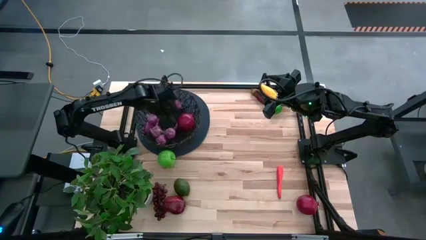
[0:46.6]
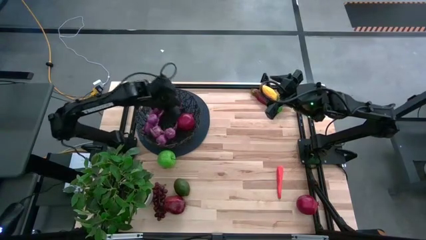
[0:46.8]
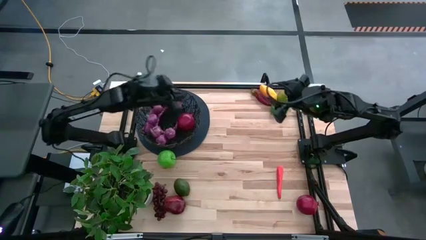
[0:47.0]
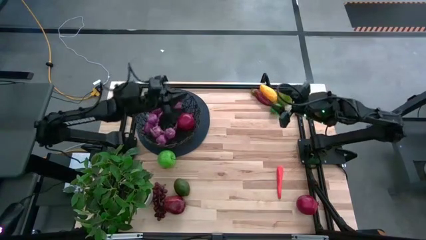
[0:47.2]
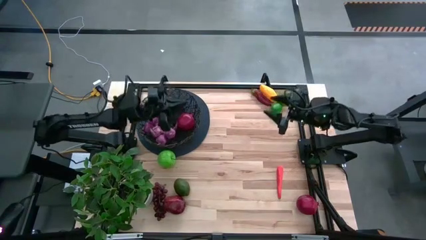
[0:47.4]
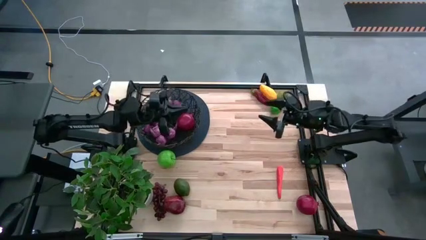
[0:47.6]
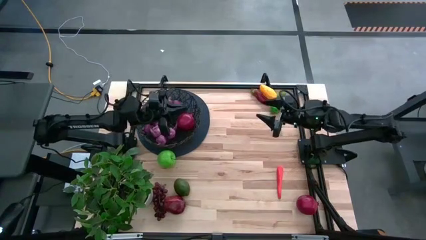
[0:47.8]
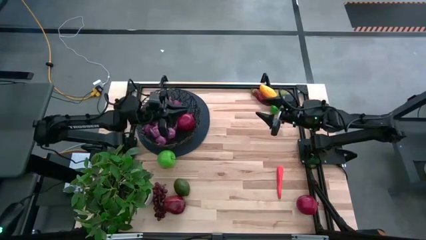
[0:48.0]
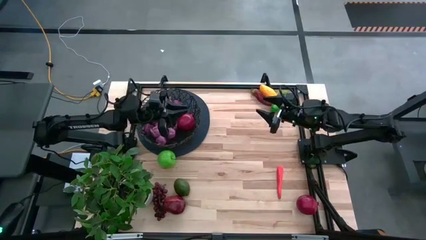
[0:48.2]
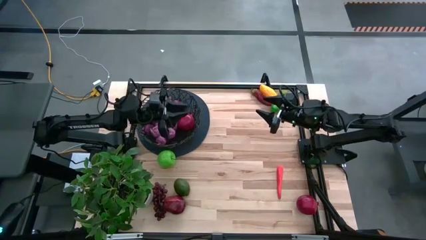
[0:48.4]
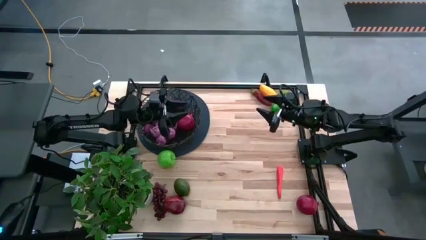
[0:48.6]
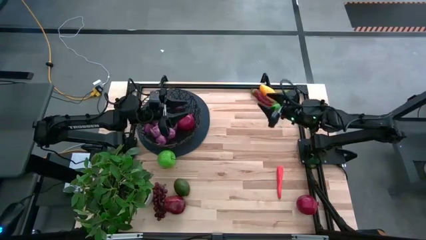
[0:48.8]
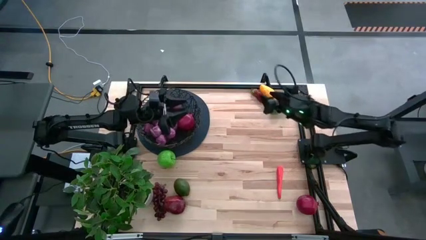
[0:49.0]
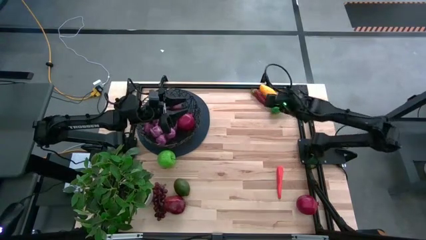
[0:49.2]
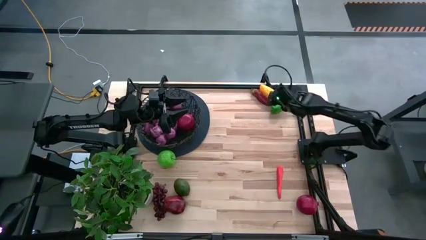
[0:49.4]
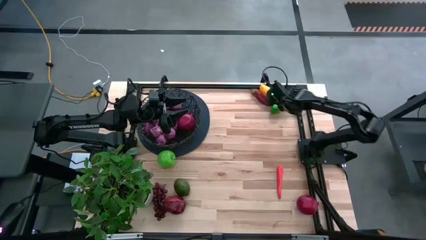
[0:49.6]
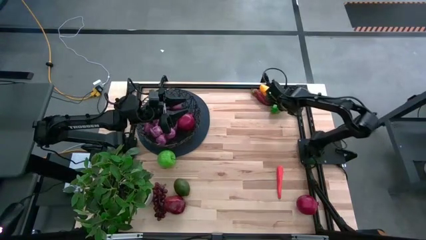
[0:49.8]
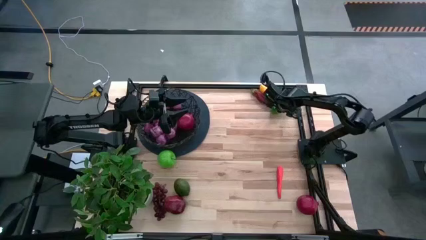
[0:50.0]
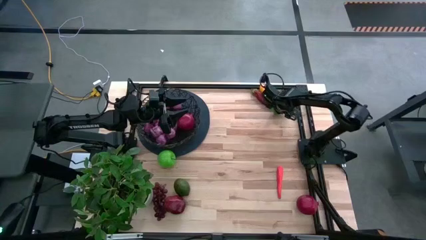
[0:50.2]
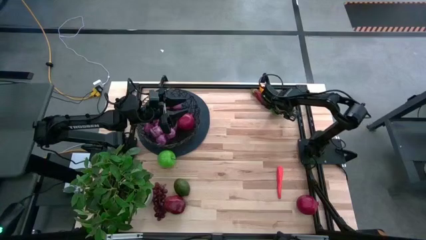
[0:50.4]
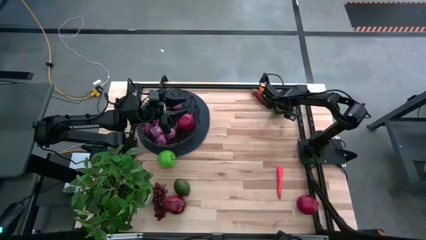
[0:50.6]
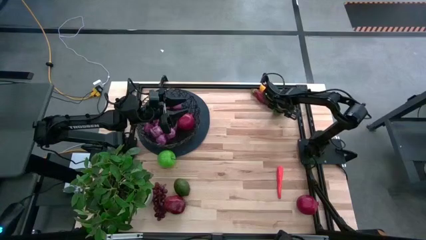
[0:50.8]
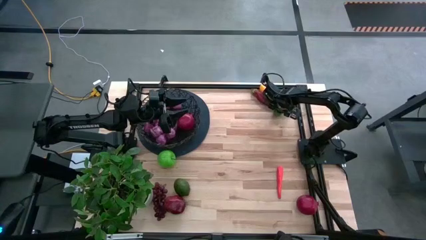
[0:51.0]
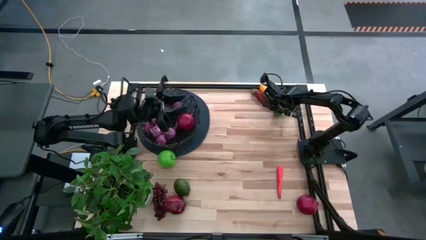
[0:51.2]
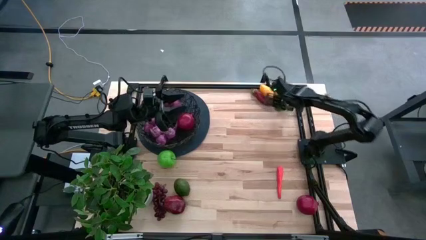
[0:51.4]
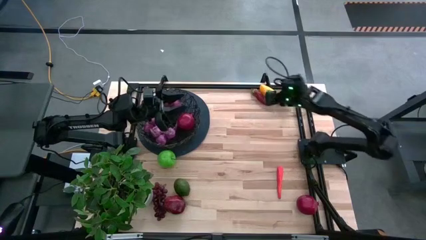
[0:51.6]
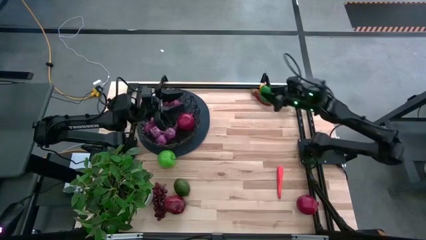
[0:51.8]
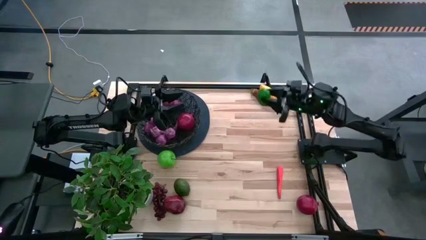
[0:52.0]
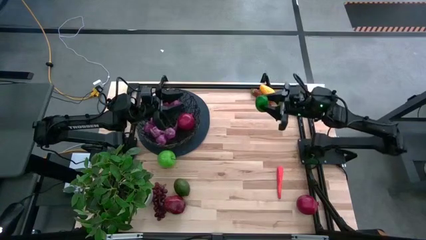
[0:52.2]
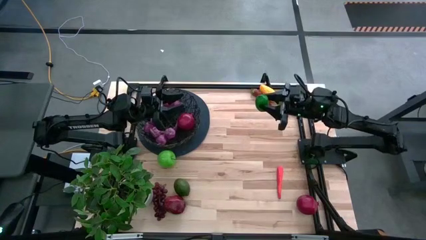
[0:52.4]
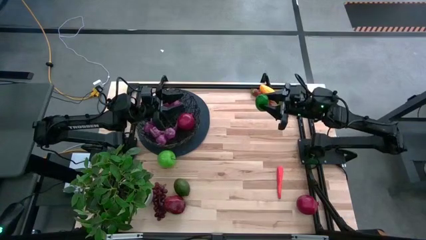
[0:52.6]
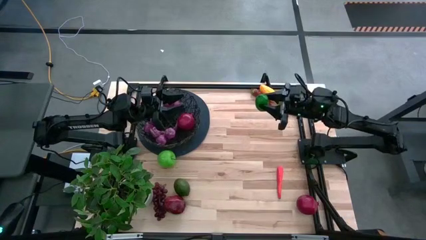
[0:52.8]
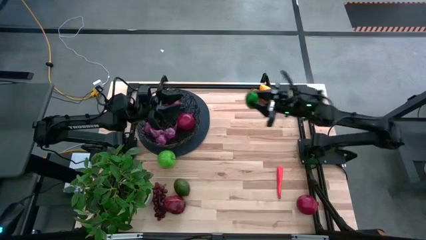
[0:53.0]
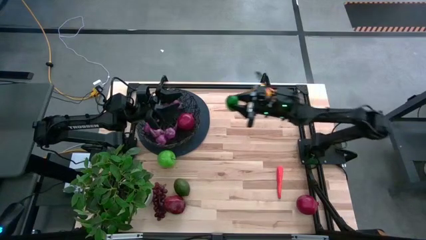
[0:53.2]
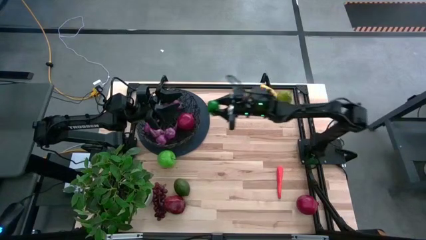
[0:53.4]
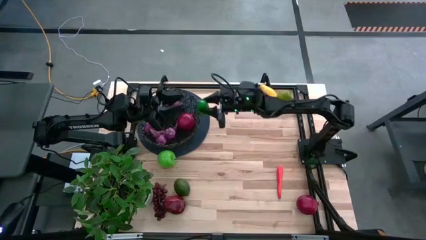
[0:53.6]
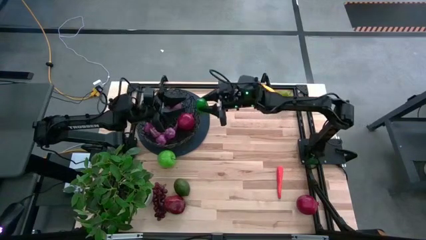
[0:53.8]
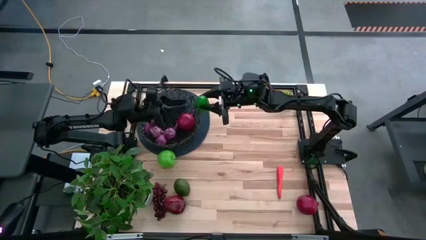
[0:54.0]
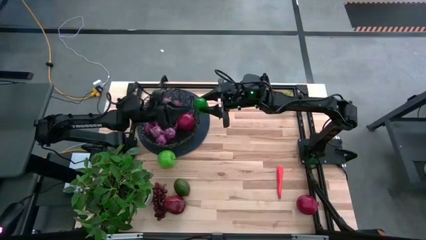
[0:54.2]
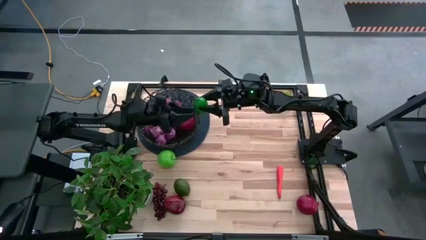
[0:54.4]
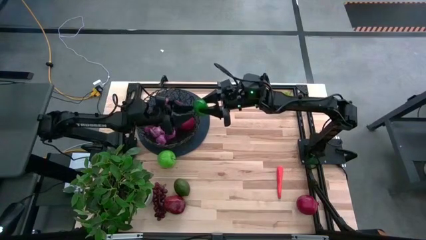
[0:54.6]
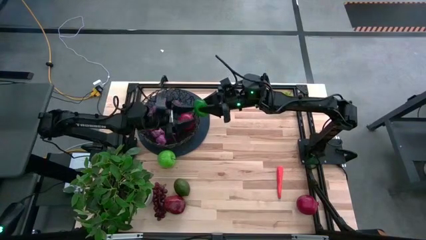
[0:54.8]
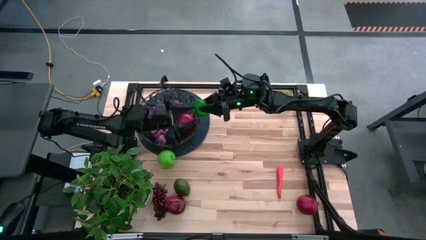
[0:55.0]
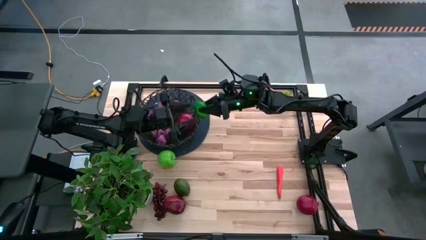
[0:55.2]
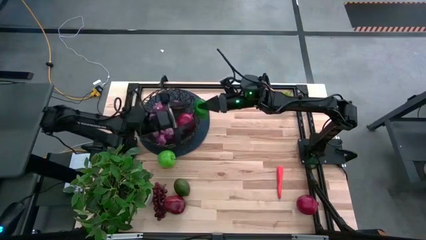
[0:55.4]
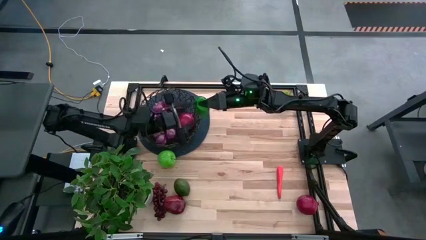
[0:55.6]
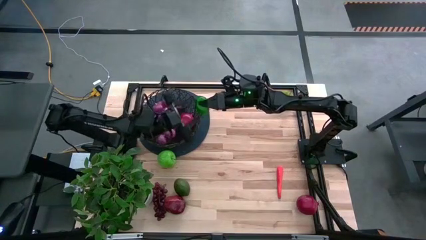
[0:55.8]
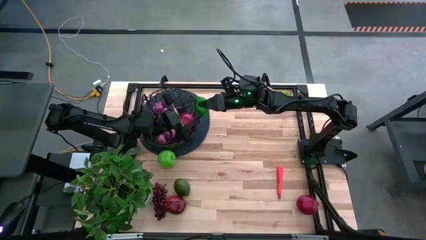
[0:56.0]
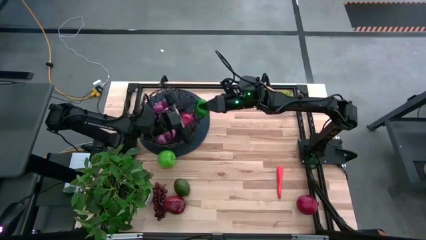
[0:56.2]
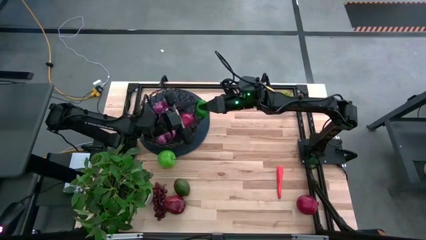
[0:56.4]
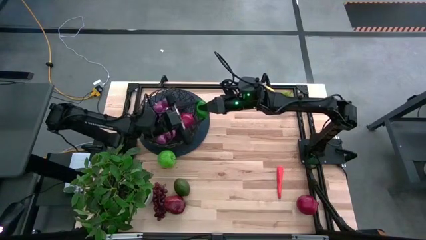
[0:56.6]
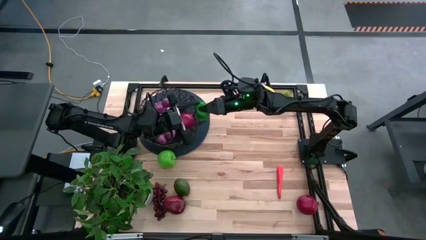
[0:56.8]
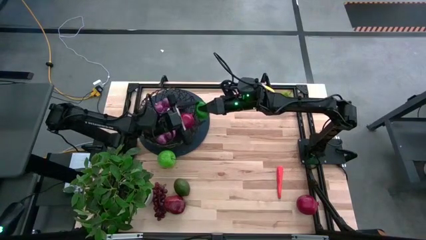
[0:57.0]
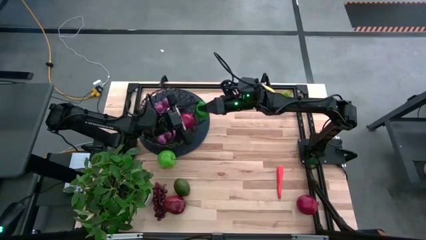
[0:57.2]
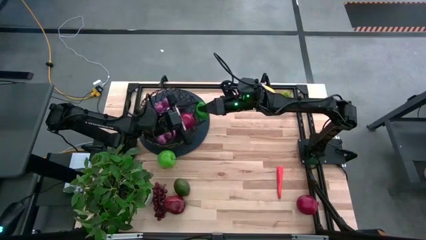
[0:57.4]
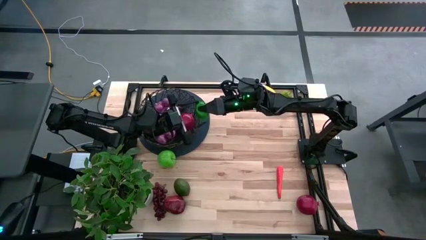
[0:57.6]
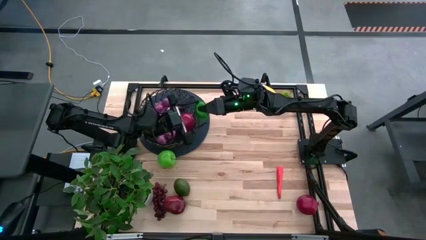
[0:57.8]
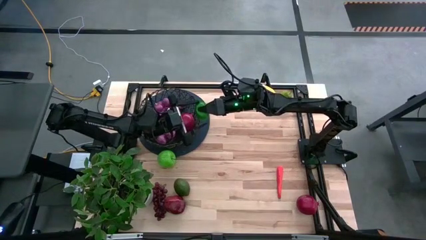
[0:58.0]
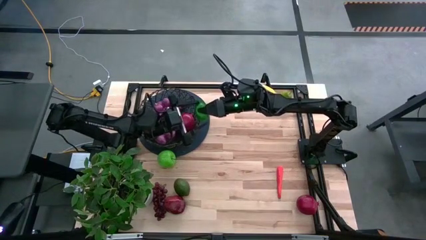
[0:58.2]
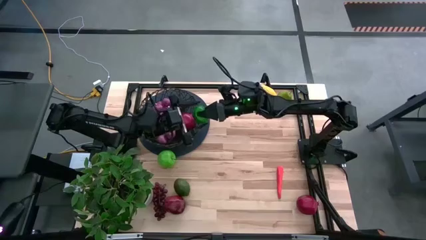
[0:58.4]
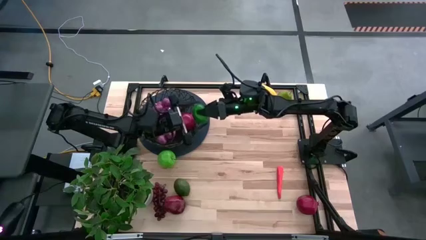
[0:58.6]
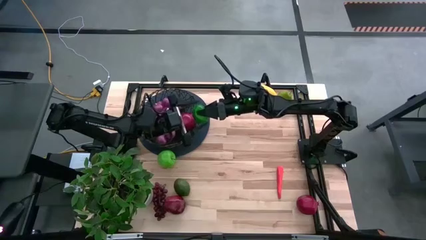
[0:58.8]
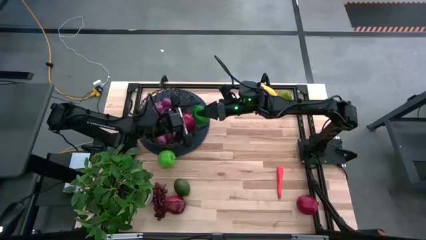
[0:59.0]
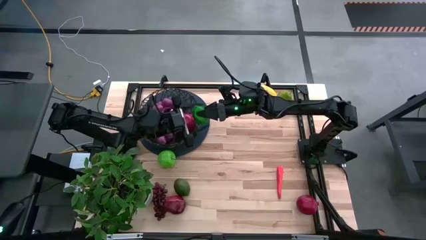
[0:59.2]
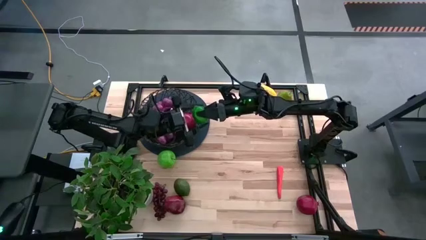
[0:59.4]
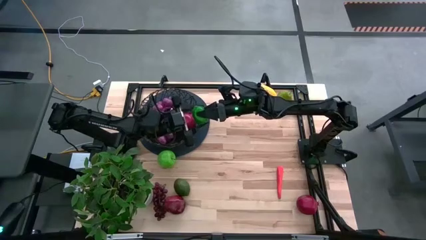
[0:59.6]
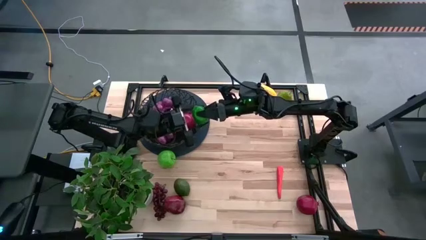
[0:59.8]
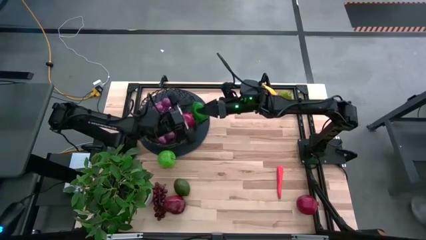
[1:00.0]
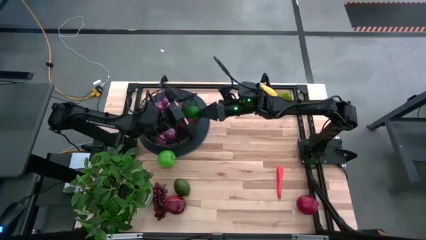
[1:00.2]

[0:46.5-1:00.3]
Task: Build produce basket
Put the top lime into the wire basket

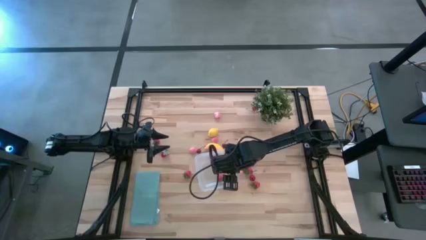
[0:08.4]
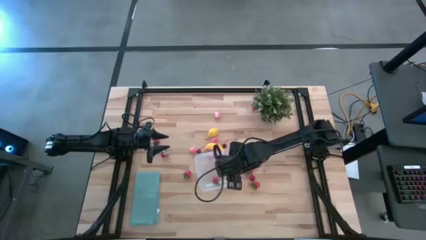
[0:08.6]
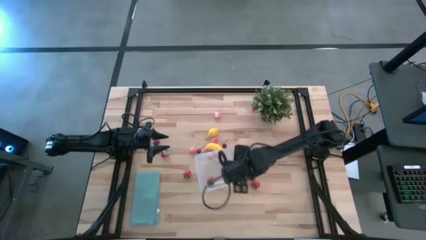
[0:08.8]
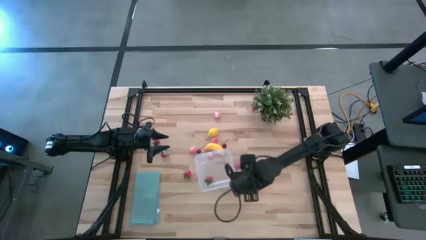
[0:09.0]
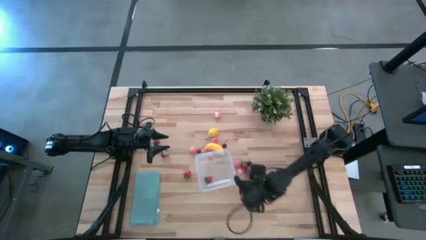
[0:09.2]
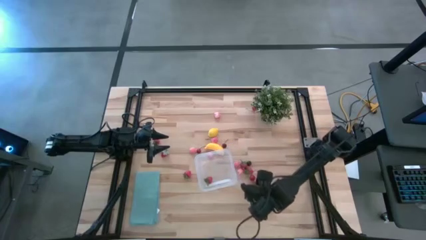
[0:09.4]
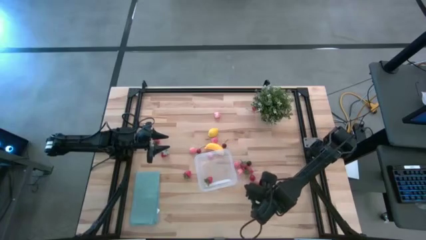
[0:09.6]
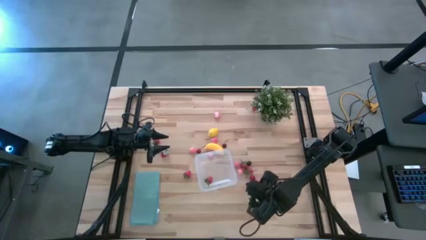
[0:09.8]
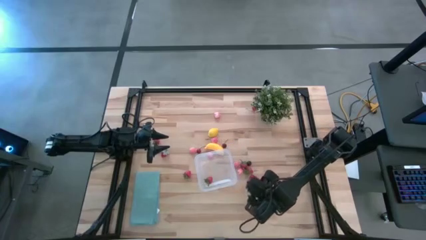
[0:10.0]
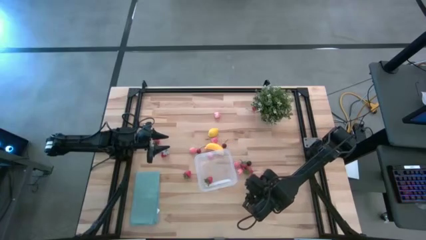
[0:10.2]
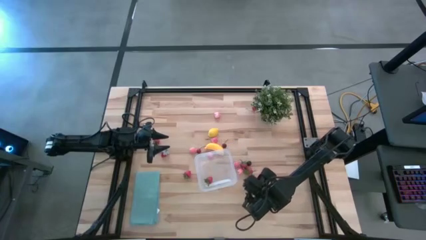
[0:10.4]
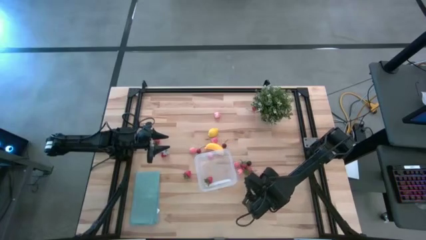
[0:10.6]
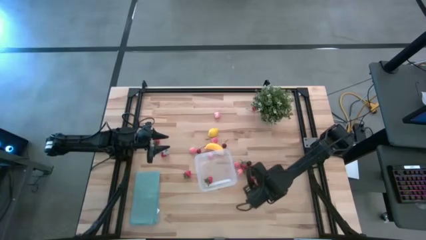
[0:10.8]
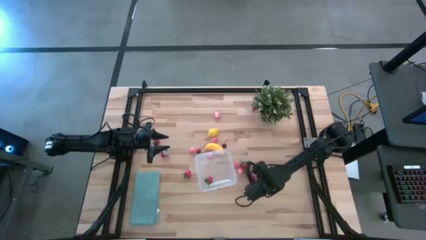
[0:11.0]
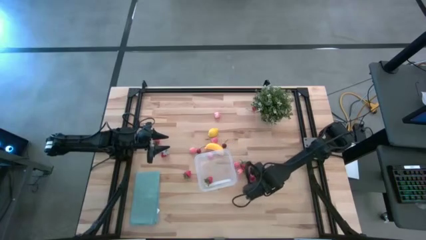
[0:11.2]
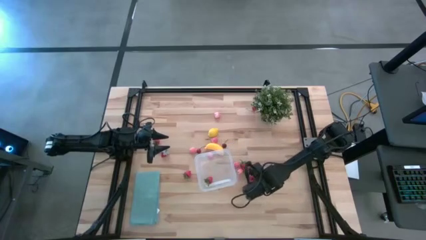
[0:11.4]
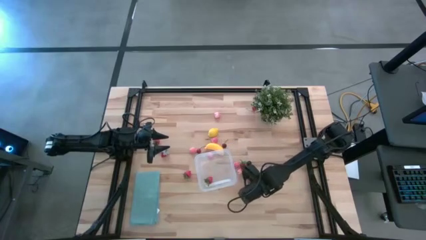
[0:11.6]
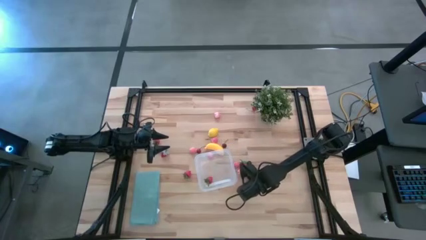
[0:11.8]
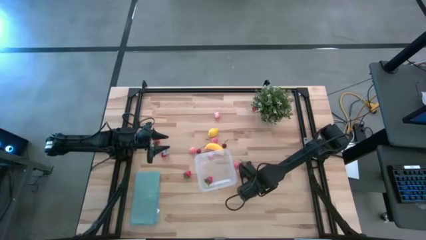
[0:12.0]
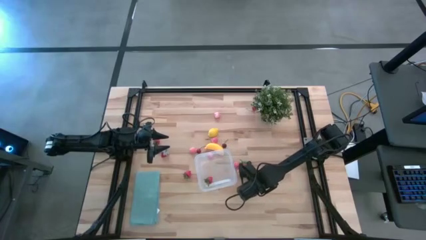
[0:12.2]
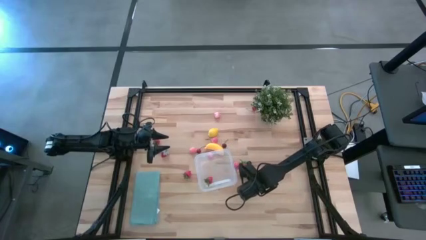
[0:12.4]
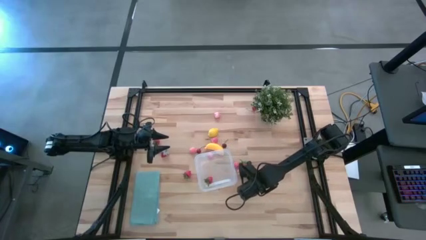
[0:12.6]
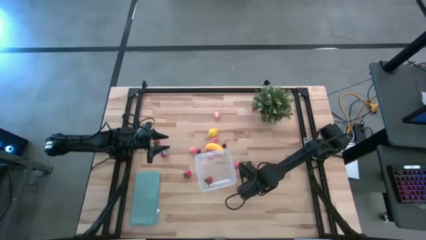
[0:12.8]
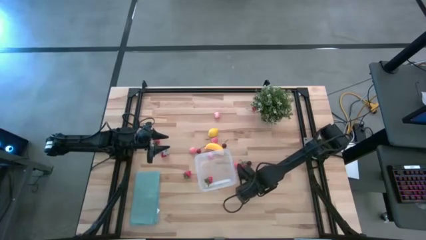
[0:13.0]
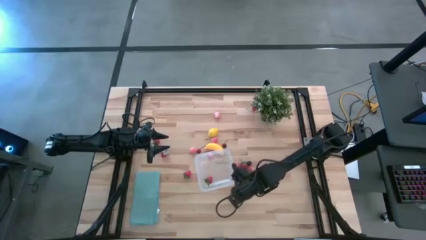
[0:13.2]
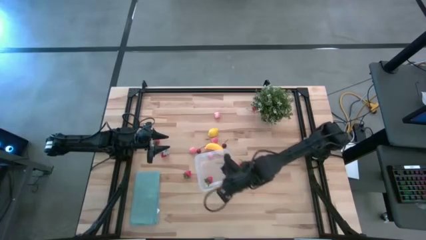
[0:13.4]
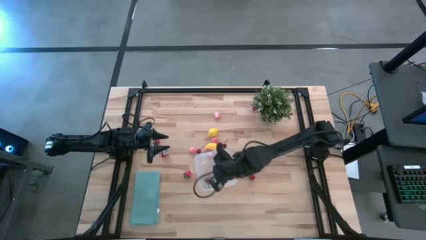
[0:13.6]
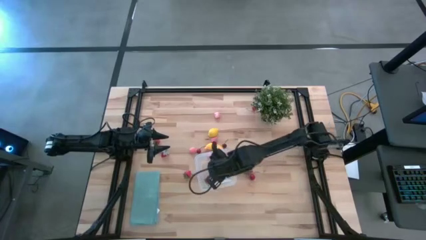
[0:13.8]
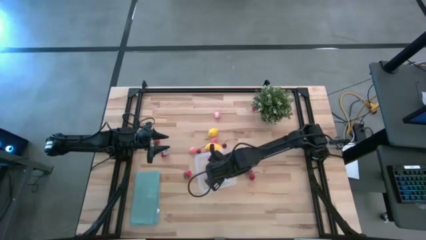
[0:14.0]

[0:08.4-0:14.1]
Task: Pick and placing Produce into tupperware
Put the red strawberry into the transparent bin
